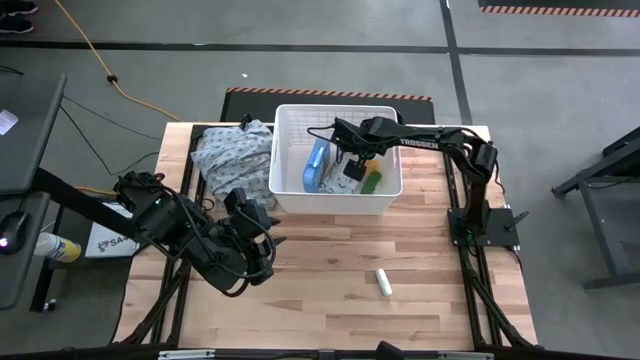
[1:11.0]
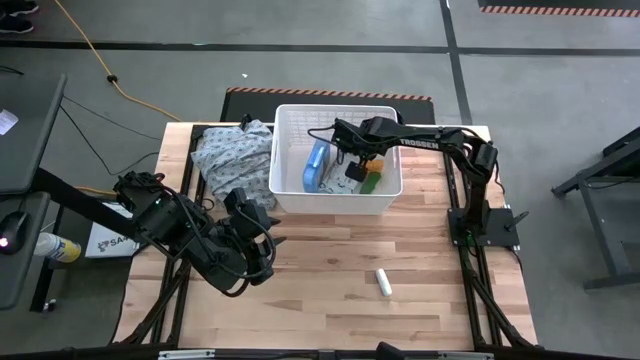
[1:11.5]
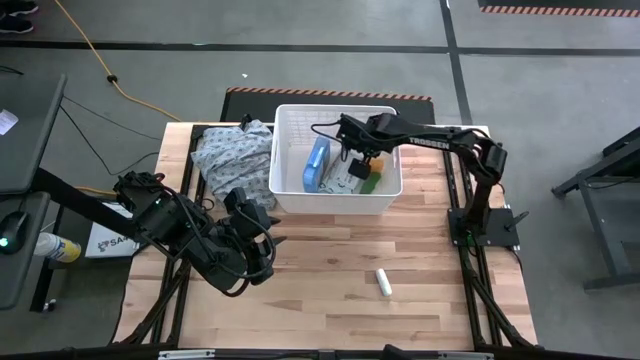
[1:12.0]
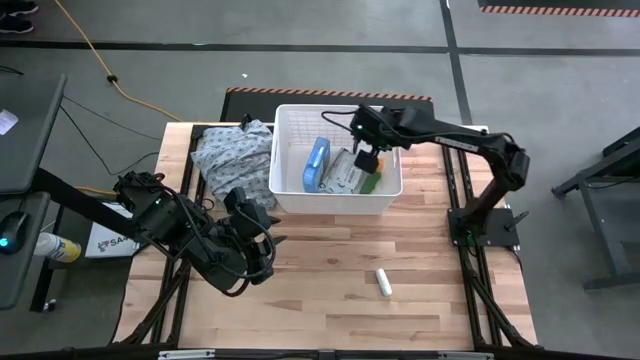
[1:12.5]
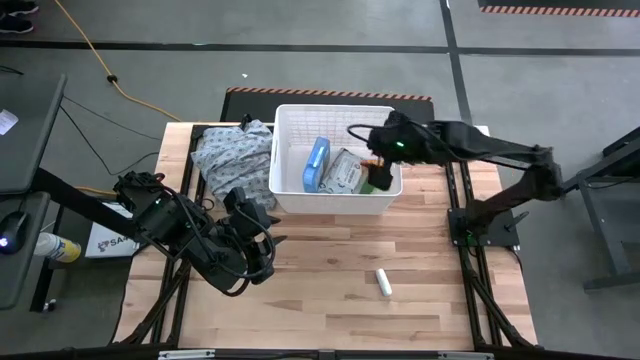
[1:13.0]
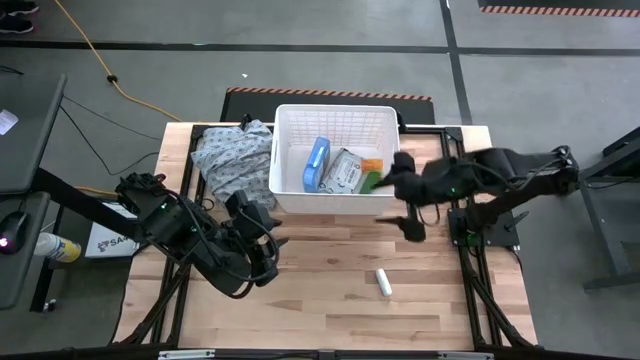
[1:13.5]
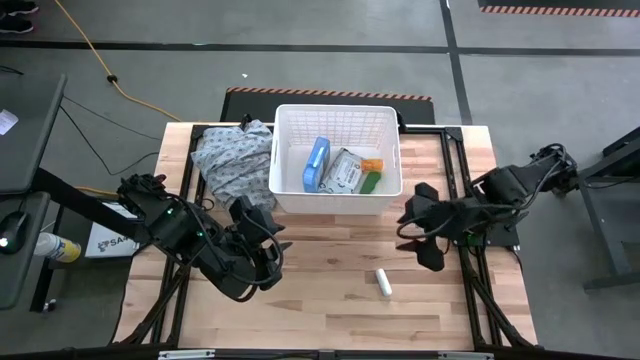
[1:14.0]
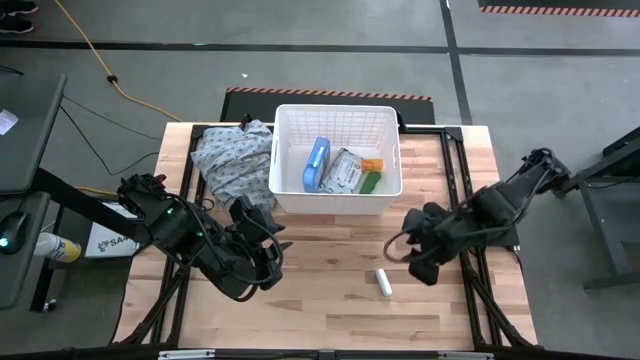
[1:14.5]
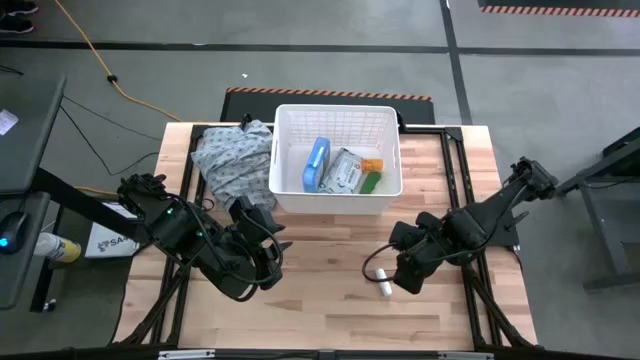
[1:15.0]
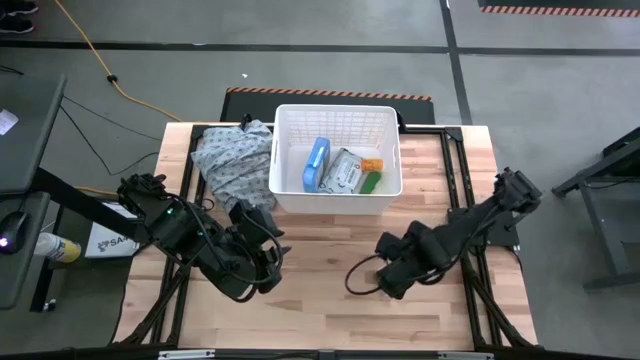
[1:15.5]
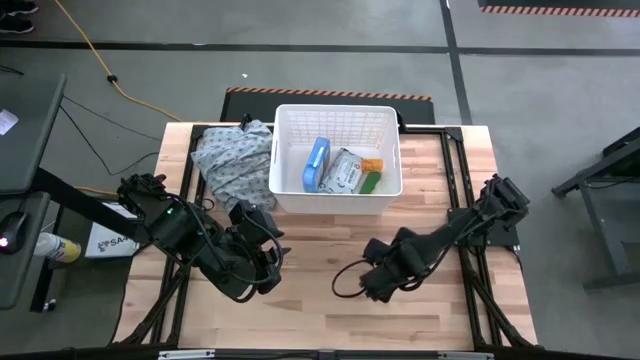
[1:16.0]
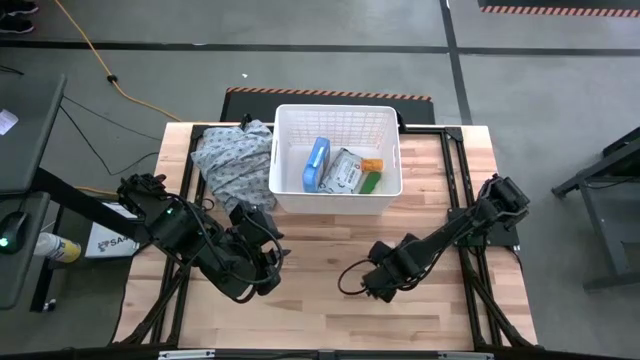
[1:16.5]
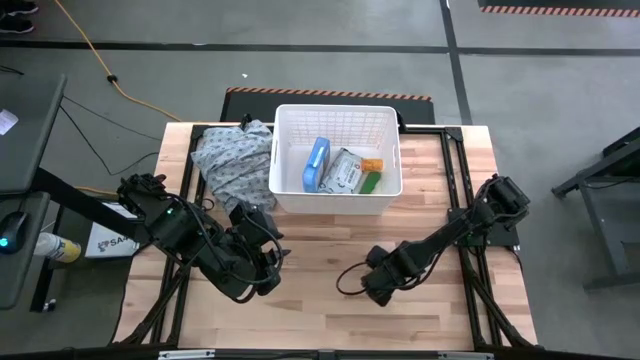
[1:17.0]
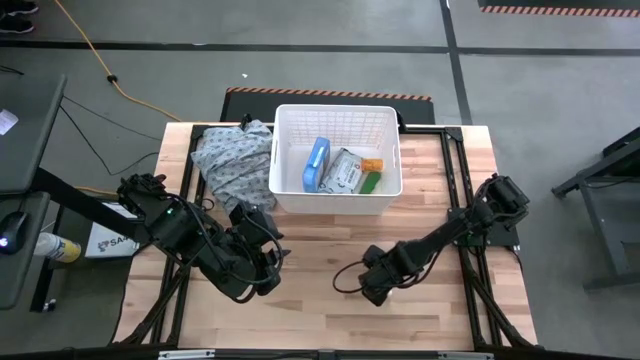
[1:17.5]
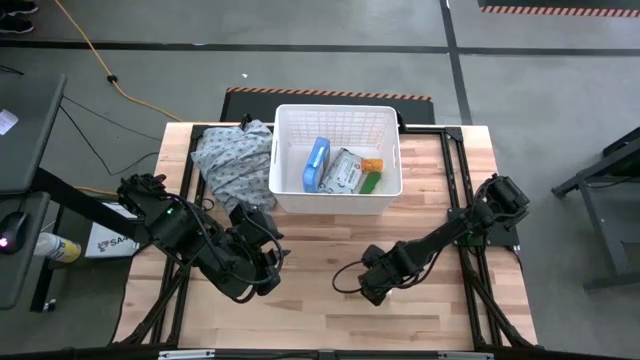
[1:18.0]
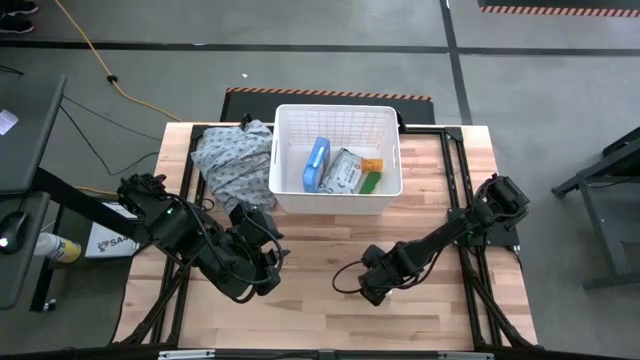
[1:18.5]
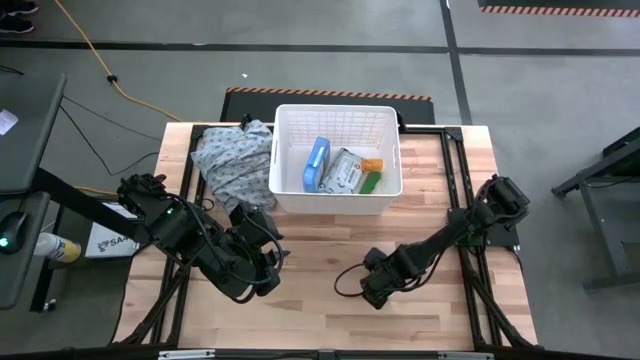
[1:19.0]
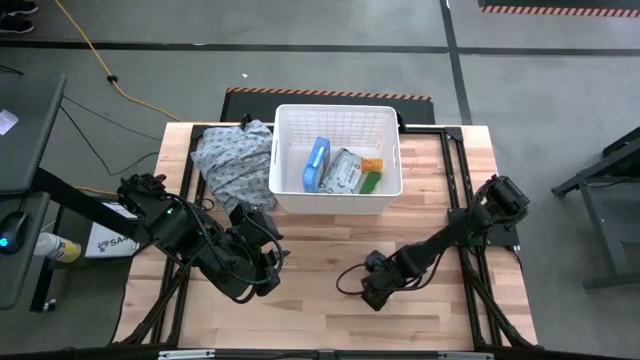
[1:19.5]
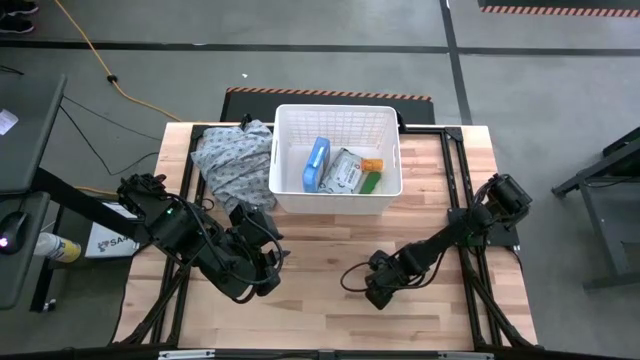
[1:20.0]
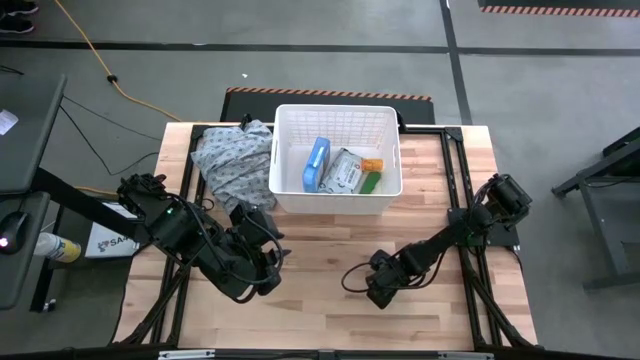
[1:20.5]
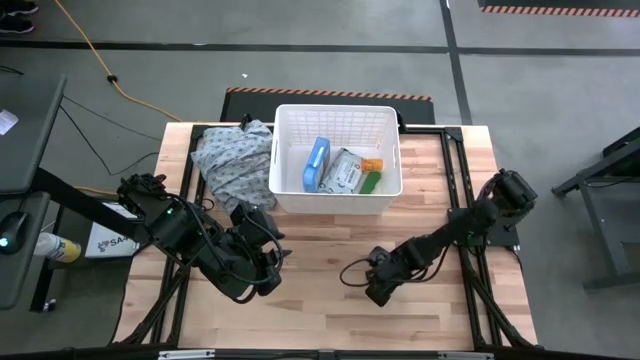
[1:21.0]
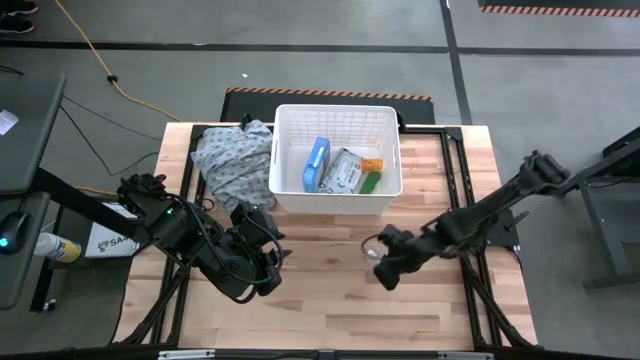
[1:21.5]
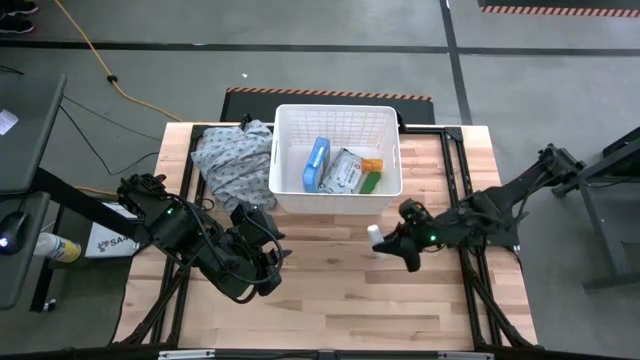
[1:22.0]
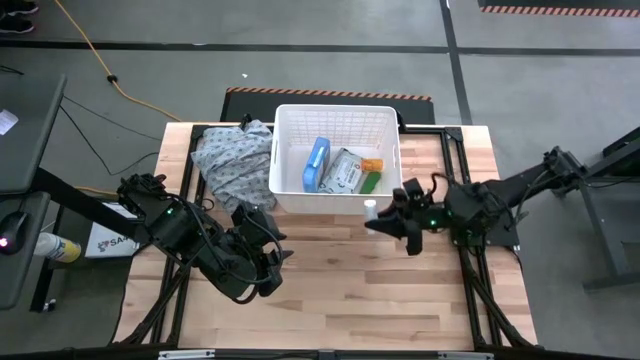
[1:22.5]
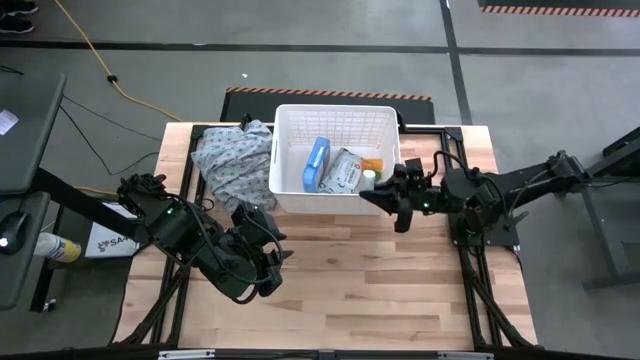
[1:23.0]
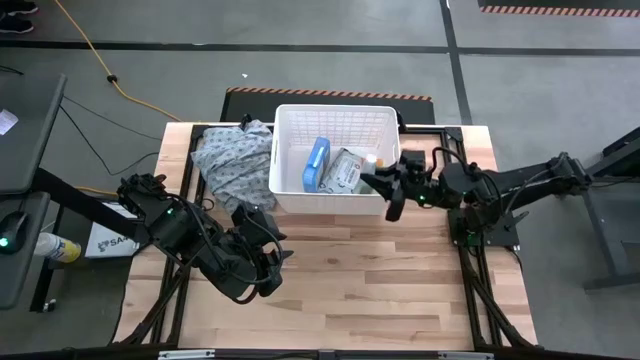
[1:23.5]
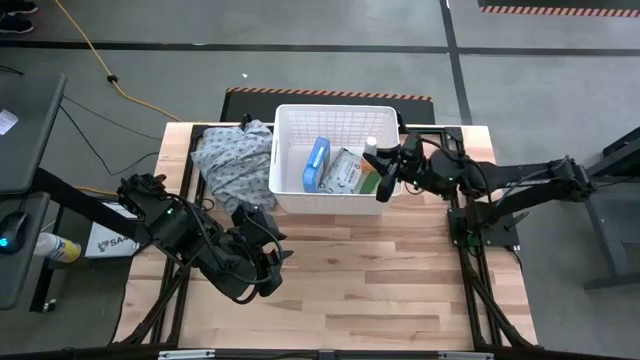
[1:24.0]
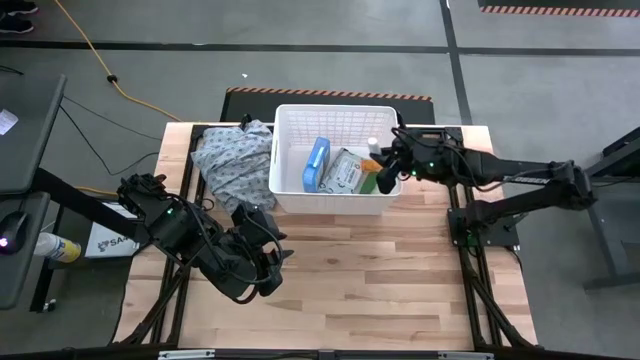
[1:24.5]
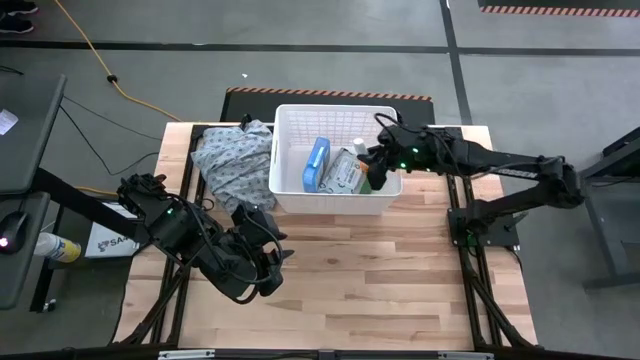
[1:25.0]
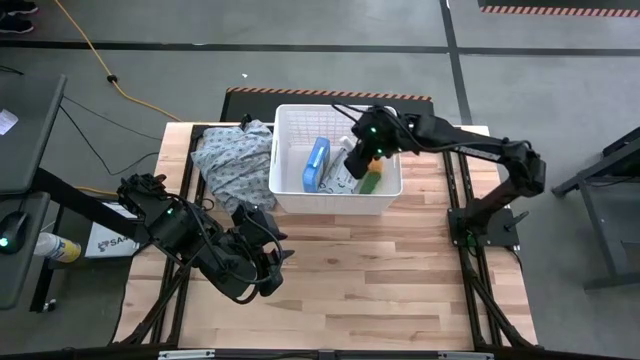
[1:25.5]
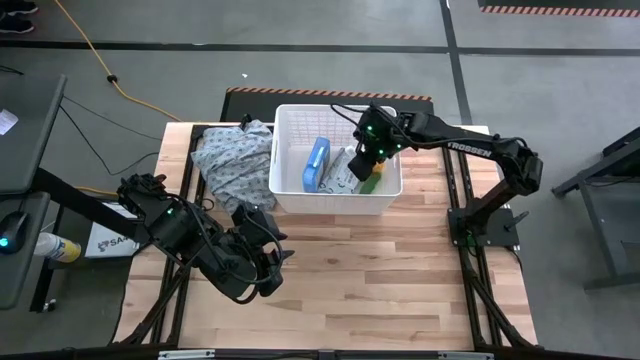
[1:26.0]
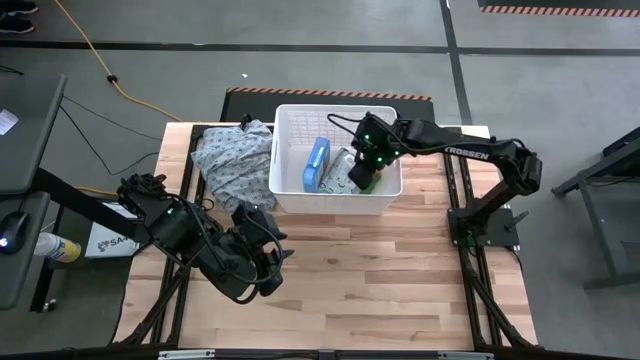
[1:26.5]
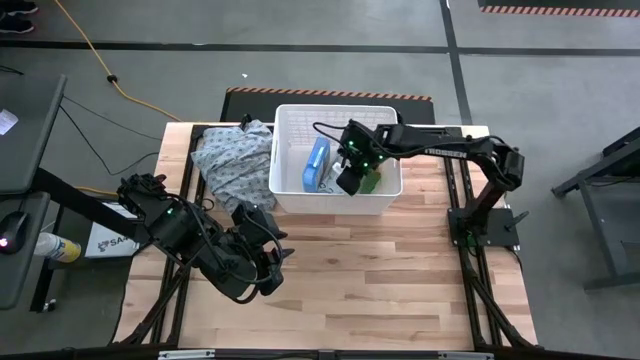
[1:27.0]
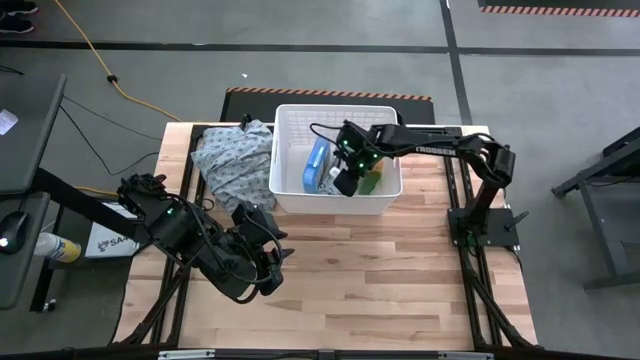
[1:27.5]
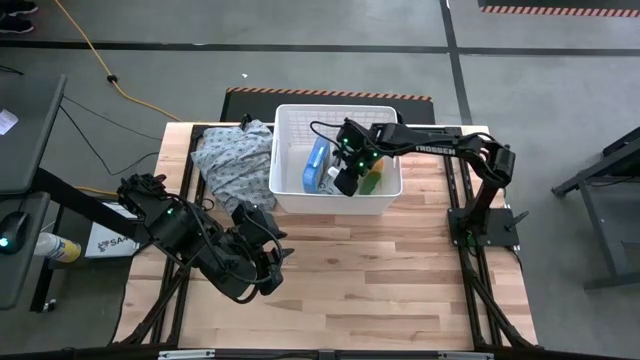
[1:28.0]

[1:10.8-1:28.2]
Task: Pick & place medical supplies in basket/bin
Put the white gauze into the white bin

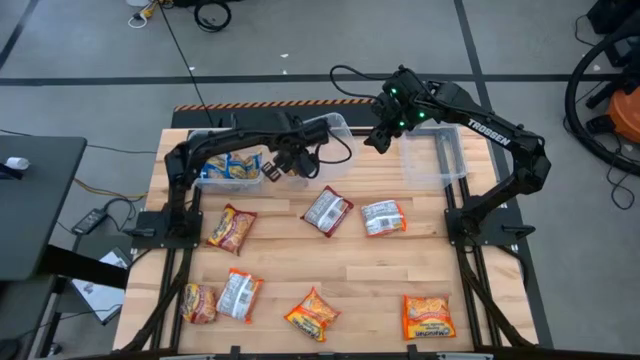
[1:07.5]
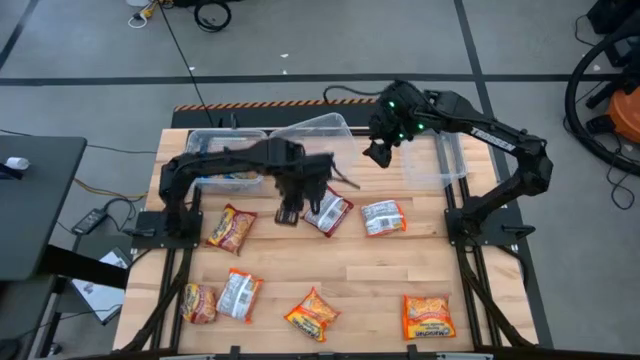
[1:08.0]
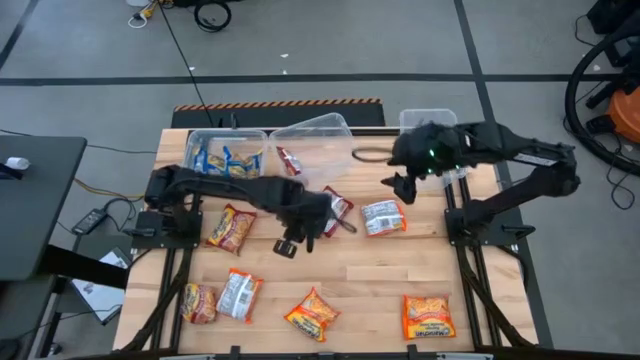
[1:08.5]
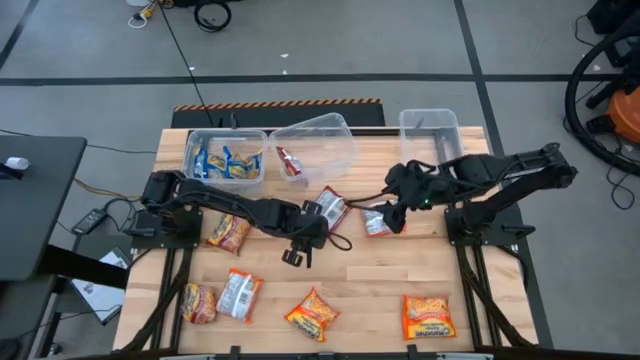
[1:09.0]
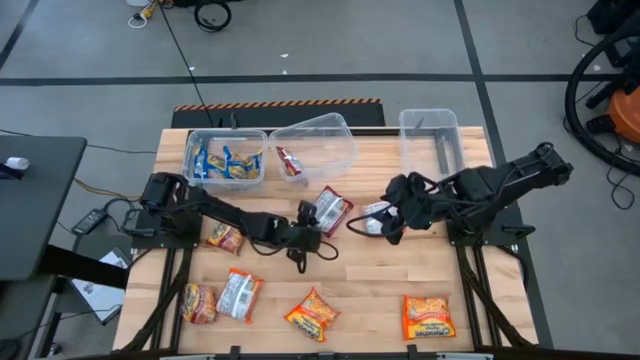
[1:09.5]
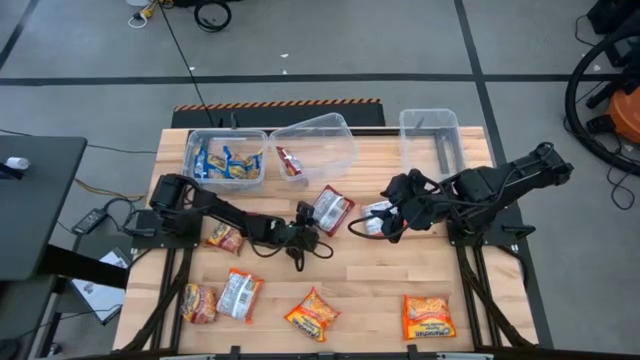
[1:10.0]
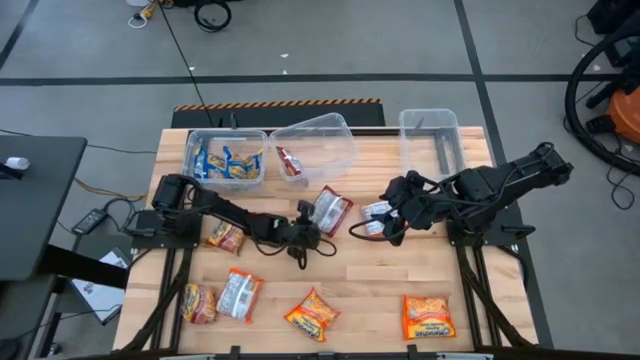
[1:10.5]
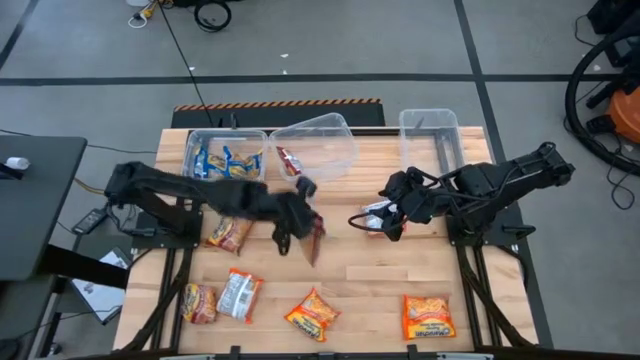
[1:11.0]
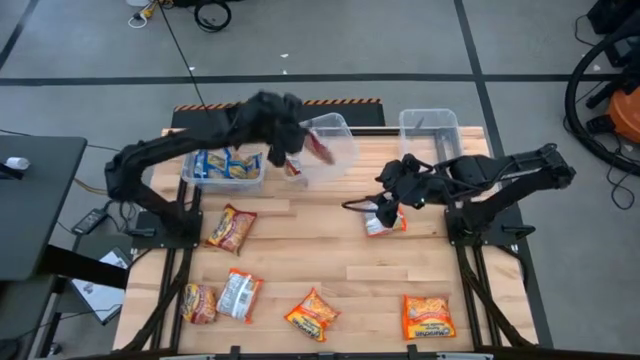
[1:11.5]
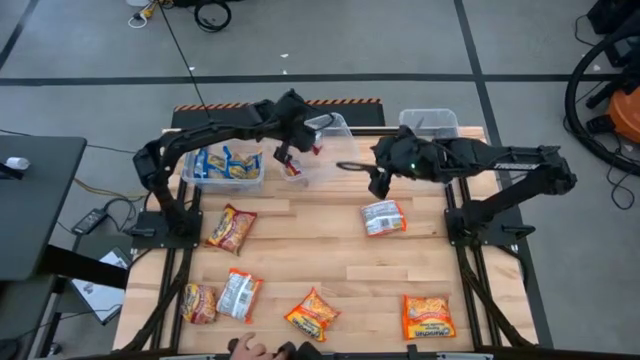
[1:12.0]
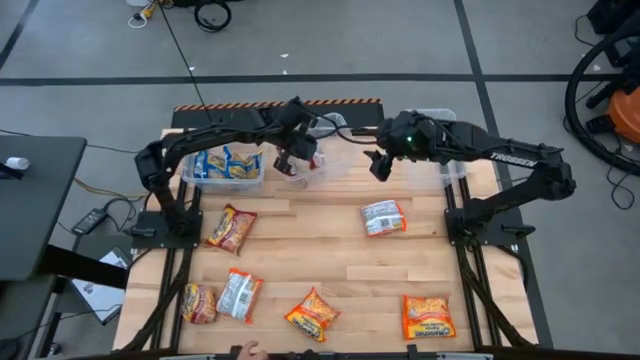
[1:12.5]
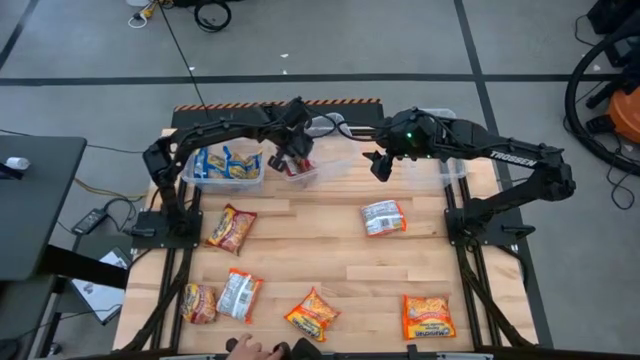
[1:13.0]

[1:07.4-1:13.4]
Task: Sort Maruchan noodles
Put the right red noodle pack into the center transparent bin
